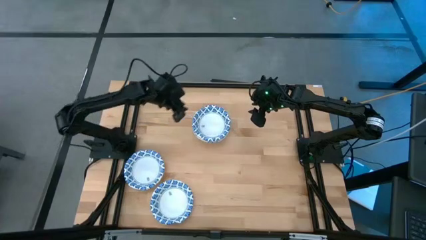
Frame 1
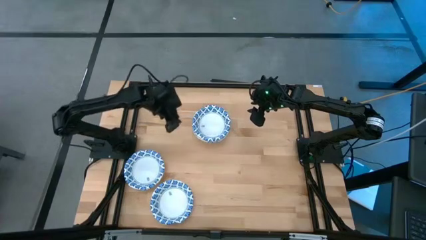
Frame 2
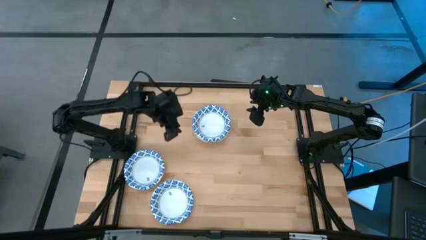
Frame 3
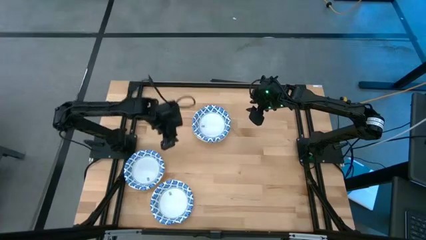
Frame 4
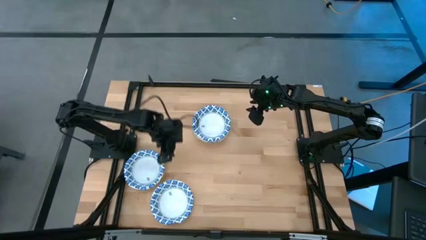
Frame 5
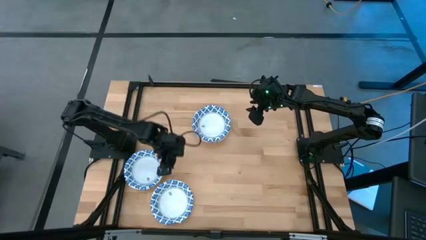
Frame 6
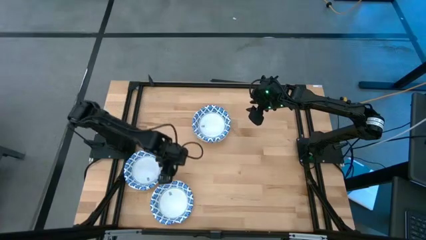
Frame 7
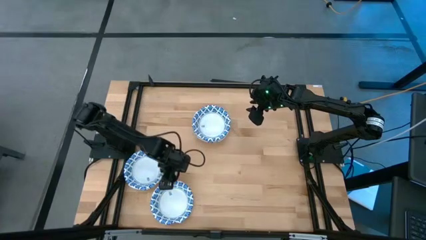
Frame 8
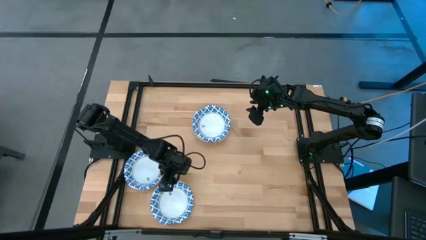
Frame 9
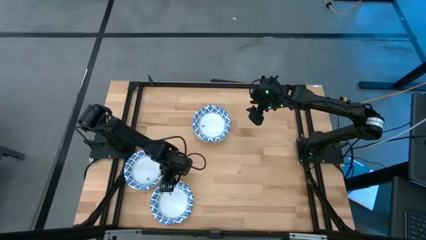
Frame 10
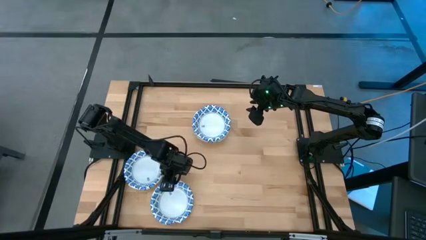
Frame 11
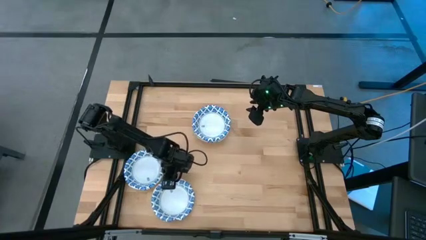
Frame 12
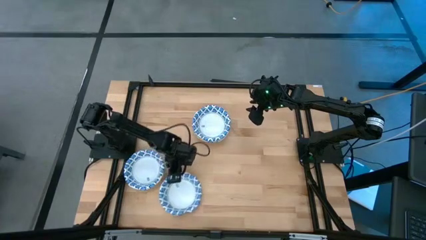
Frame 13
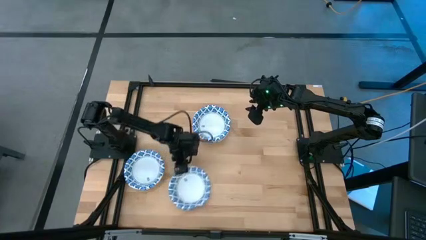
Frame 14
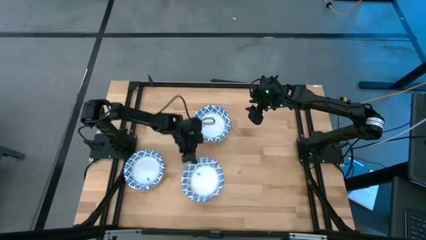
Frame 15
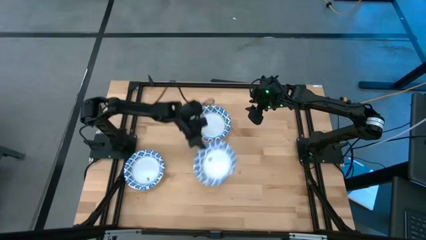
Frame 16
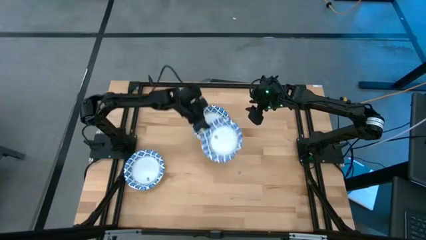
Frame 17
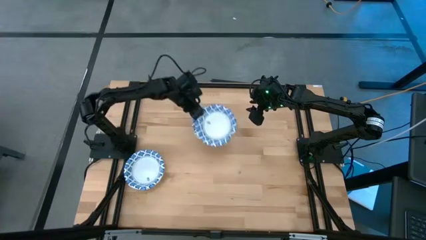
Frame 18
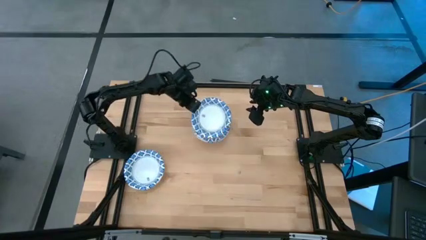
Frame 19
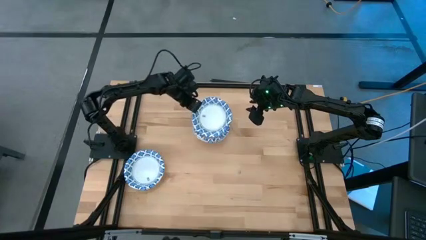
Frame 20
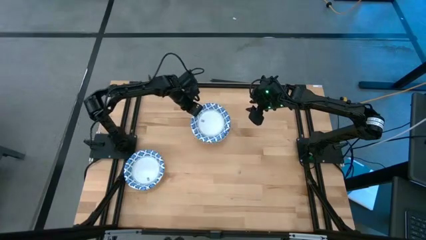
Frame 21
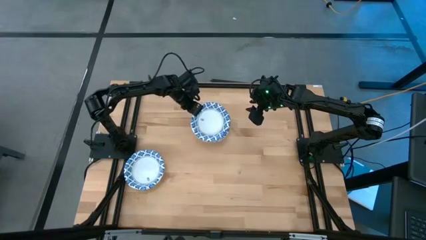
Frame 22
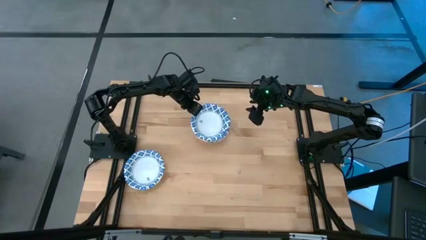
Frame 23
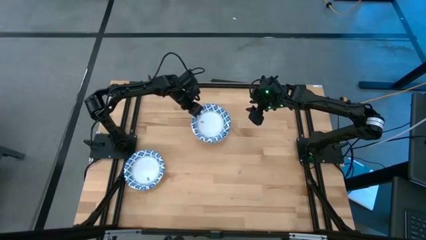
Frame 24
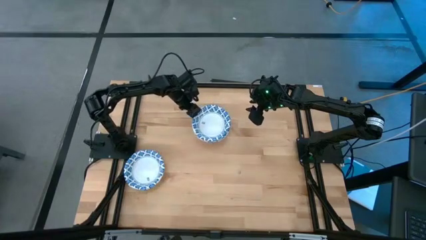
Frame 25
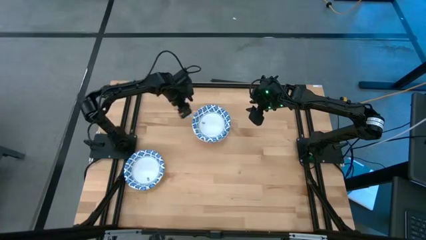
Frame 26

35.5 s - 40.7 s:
Task: Nest bowls inside each other
Stack the white and blue bowl on the white and blue bowl on the table

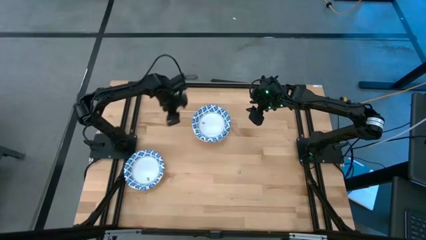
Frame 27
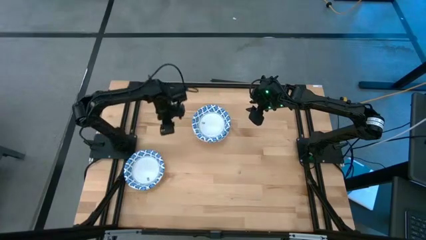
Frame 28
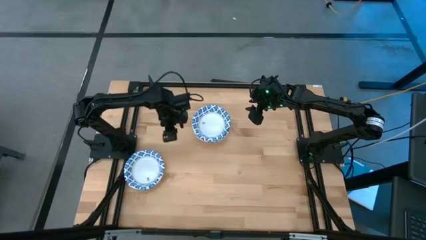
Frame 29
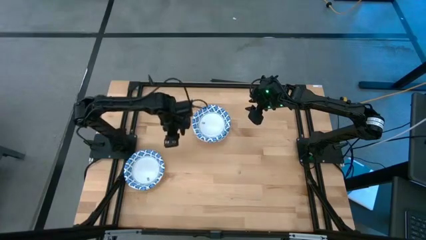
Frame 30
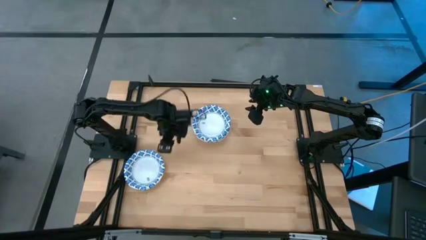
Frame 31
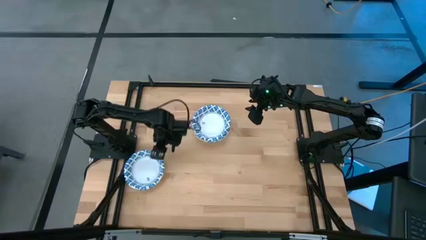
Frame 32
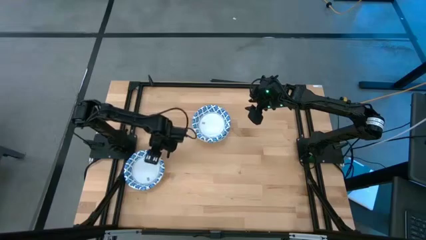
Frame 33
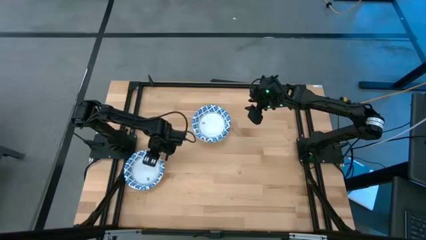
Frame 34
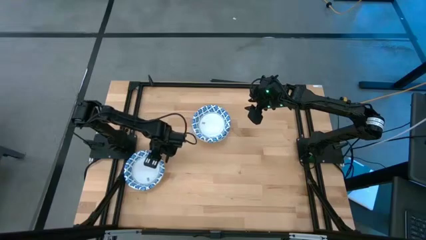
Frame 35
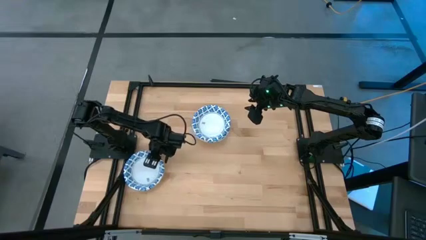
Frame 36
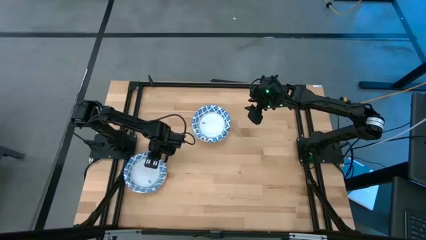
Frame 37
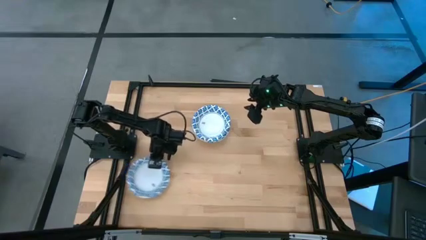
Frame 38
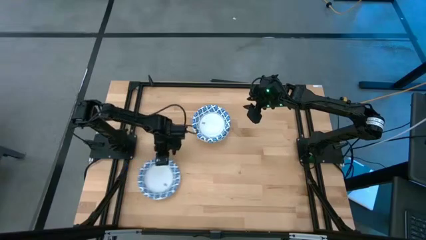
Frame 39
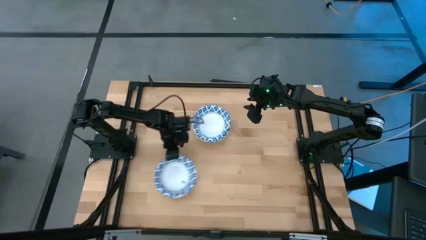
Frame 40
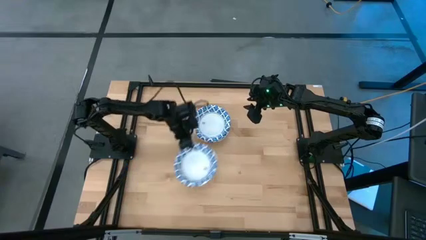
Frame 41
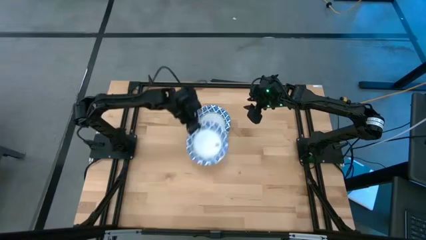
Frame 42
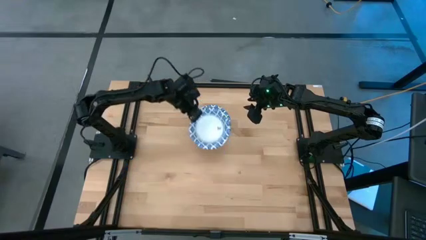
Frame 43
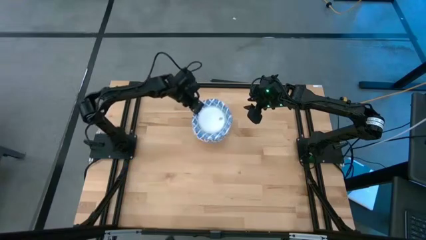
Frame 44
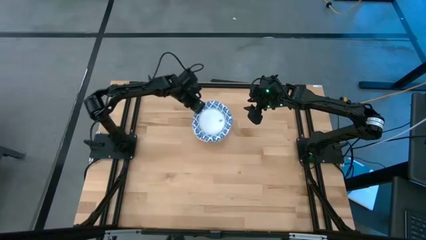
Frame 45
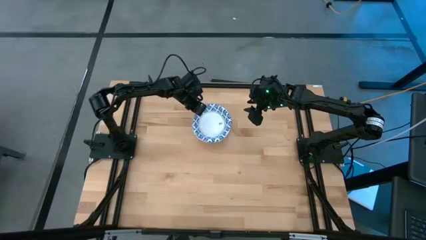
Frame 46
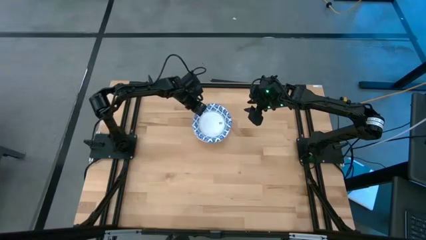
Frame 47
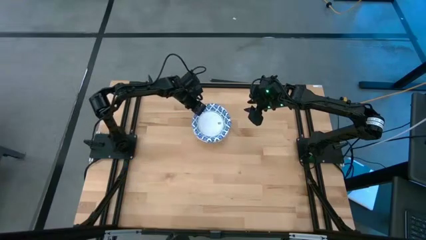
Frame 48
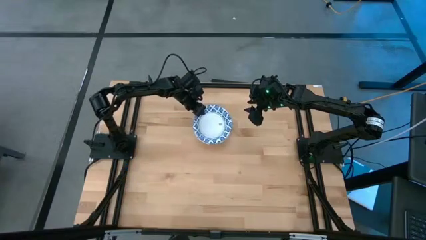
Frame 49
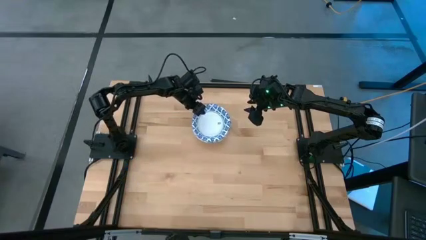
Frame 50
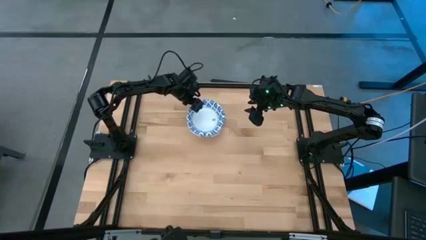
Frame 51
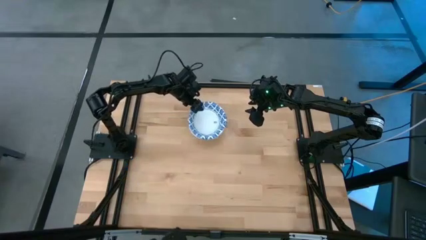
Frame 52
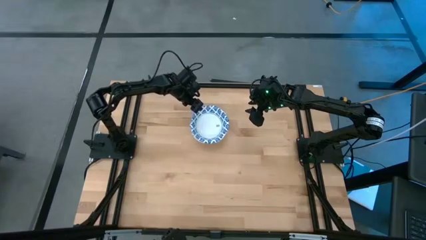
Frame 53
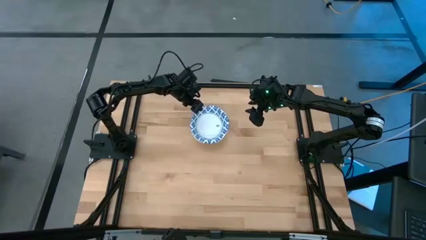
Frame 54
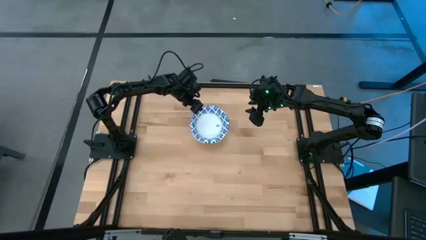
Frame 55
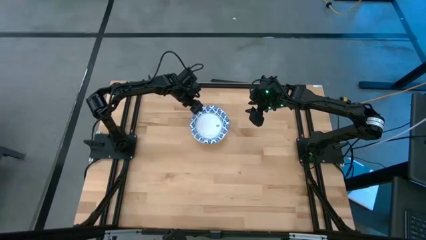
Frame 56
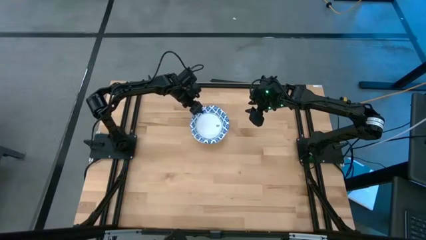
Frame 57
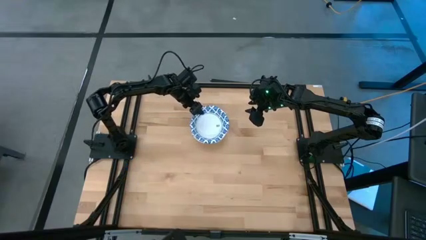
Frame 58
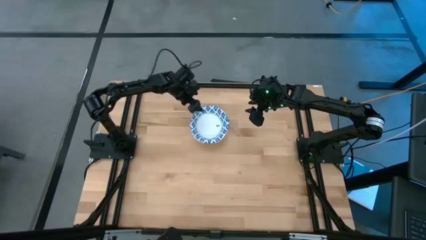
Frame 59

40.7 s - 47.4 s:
Stack the white and blue bowl on the white and blue bowl on the table

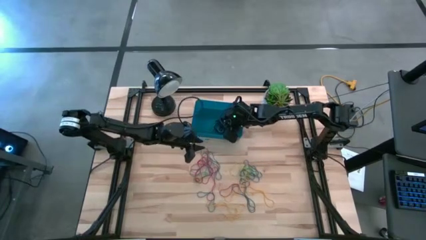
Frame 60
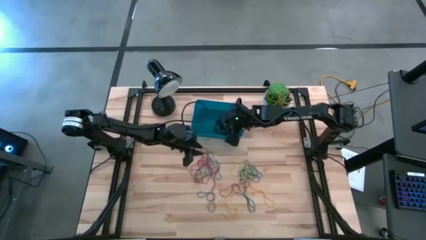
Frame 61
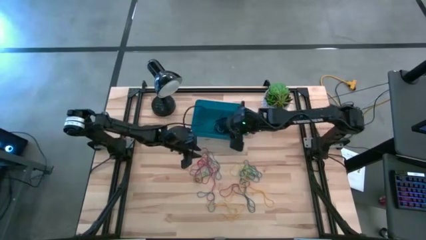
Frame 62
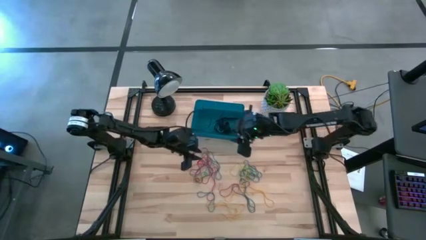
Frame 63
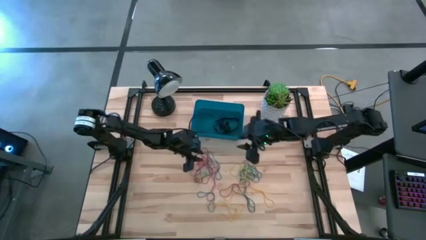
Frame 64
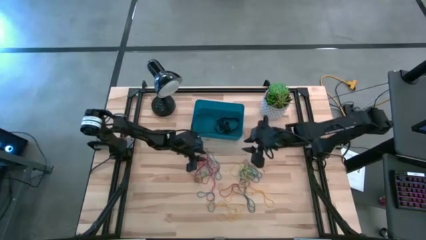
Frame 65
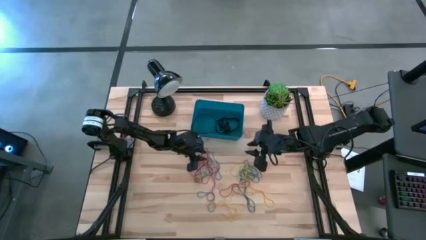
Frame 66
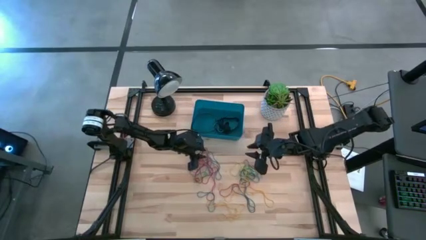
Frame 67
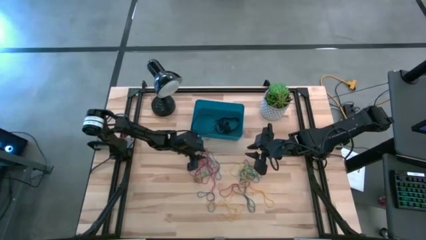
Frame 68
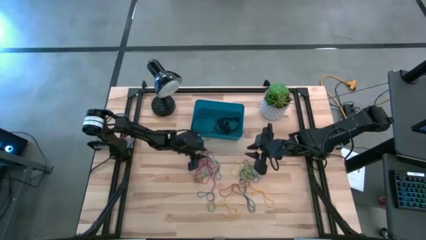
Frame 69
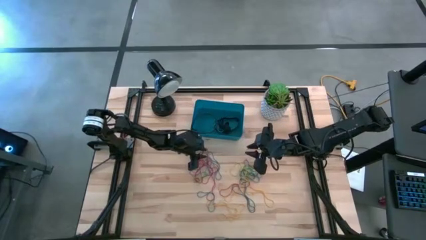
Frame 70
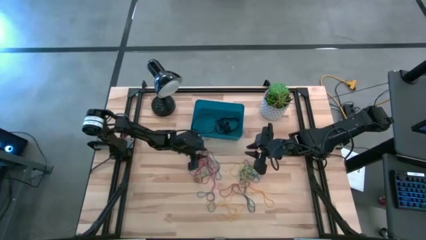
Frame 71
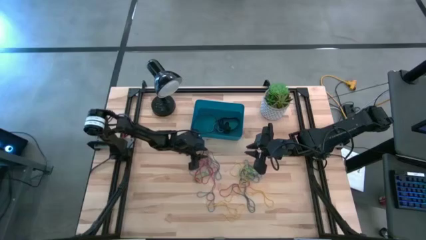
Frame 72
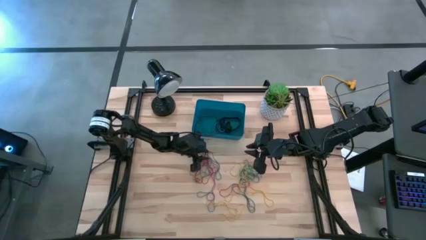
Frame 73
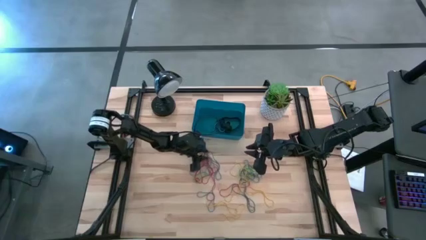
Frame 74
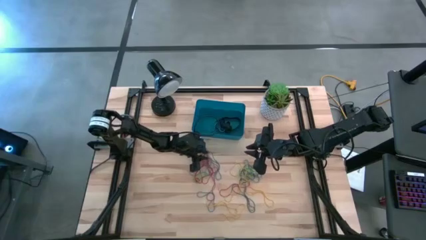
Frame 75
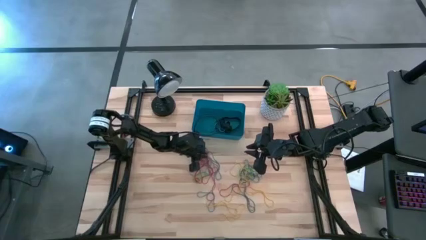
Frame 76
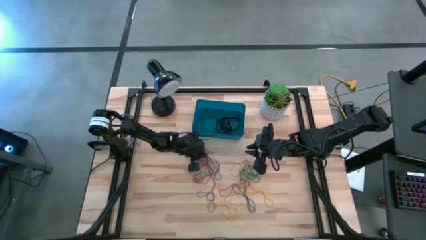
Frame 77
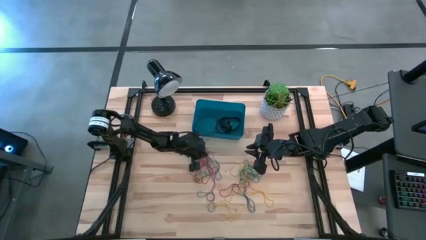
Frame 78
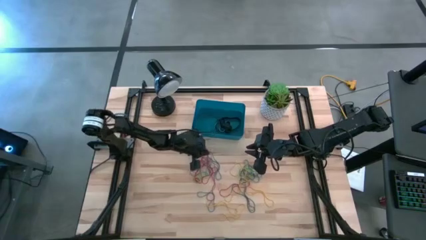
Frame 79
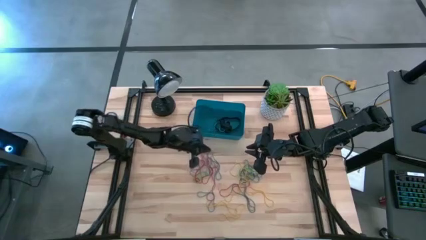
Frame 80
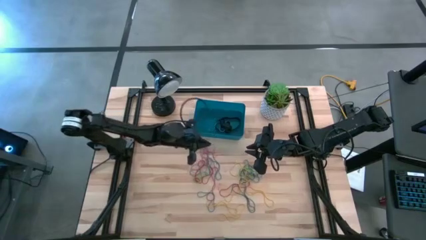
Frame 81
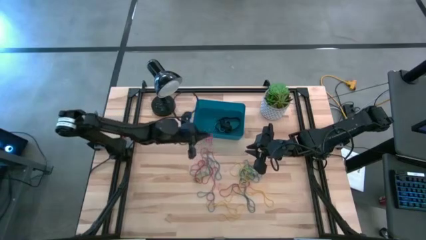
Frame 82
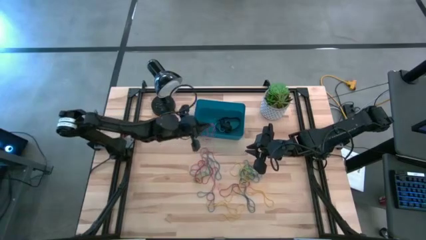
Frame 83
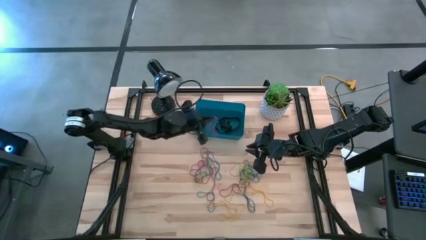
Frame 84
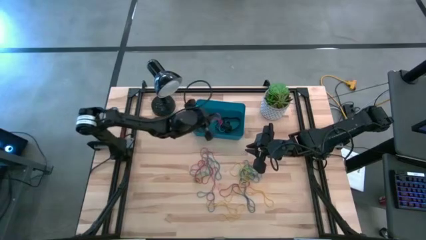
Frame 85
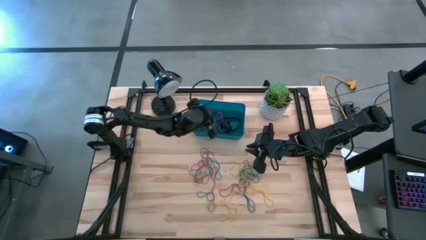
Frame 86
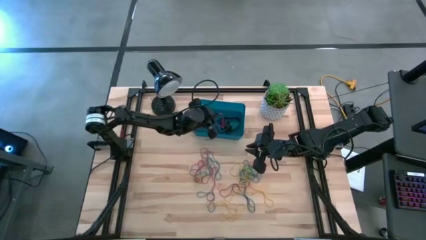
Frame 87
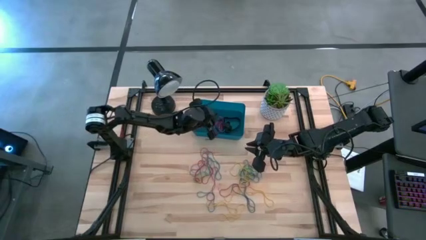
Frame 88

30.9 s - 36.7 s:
Task: Pick and place rubber bands into bin
Put the red rubber band into the blue bin
